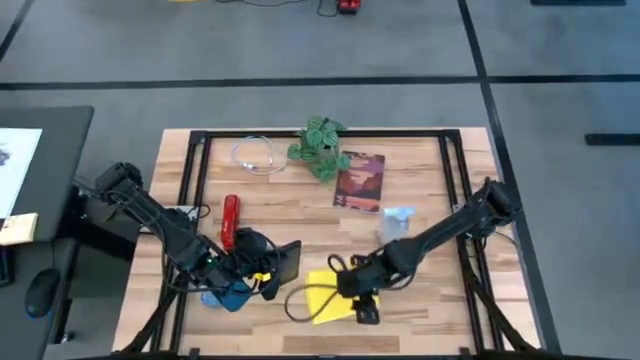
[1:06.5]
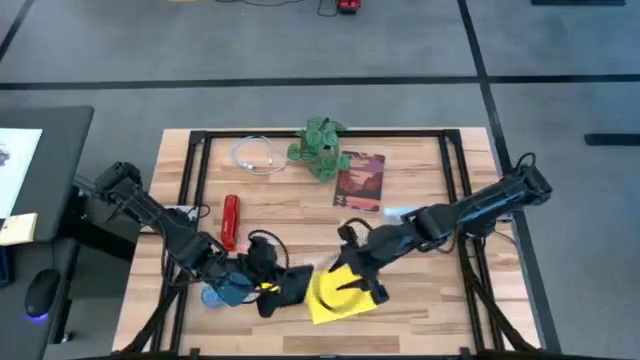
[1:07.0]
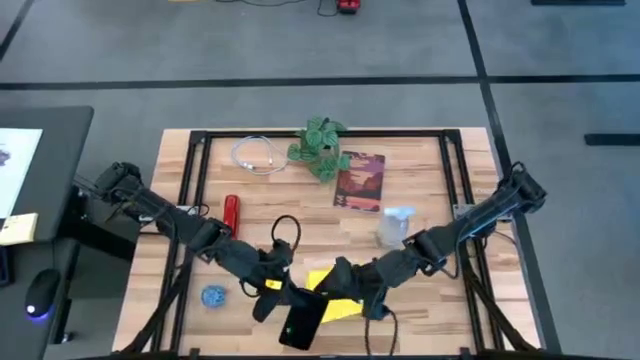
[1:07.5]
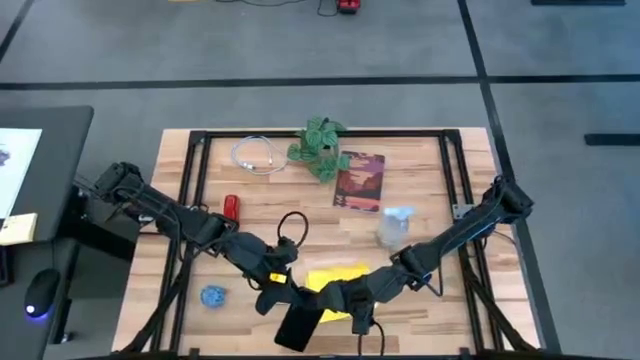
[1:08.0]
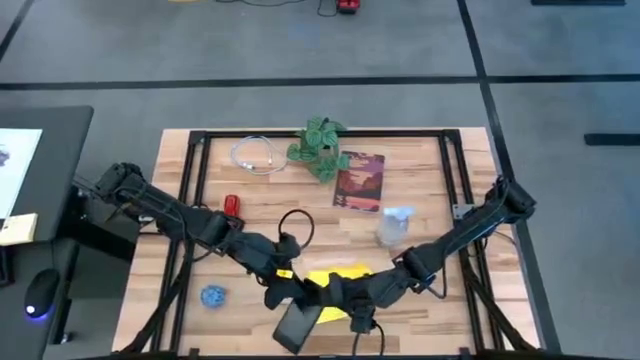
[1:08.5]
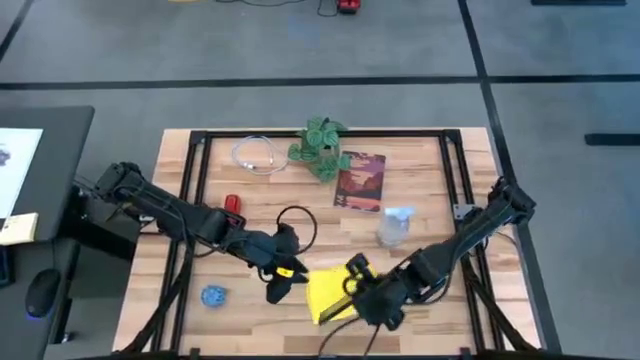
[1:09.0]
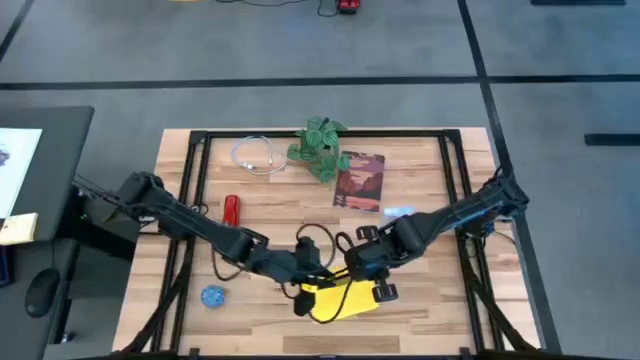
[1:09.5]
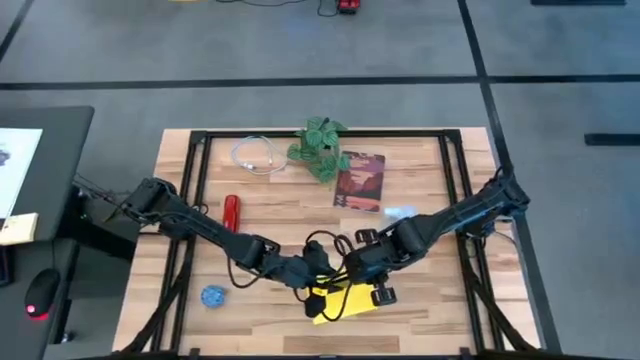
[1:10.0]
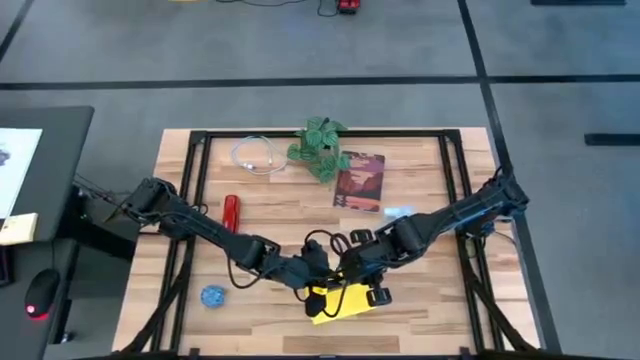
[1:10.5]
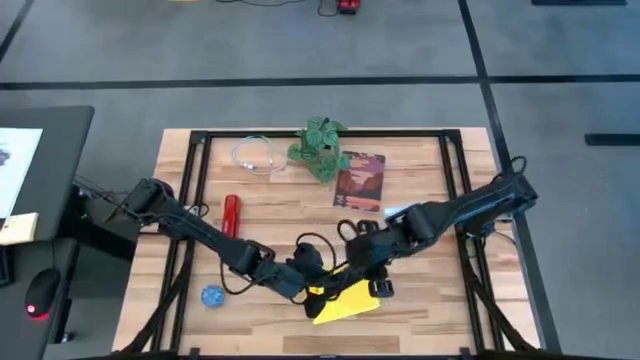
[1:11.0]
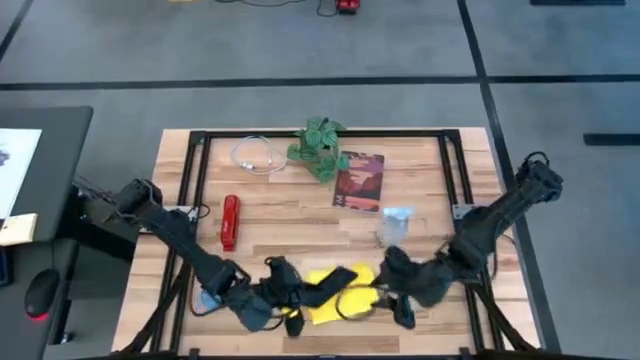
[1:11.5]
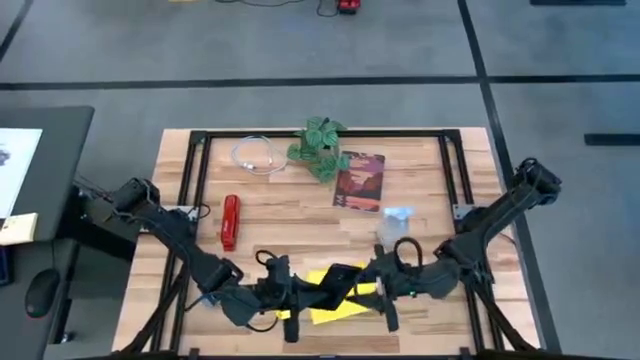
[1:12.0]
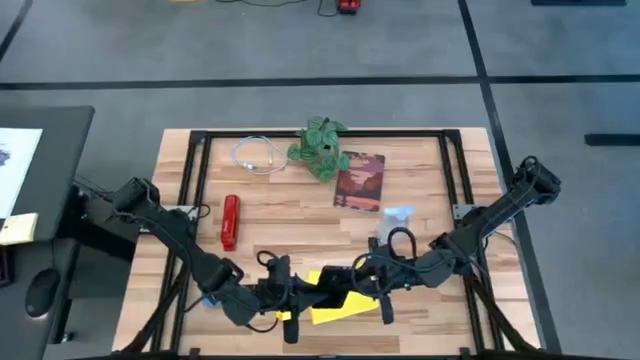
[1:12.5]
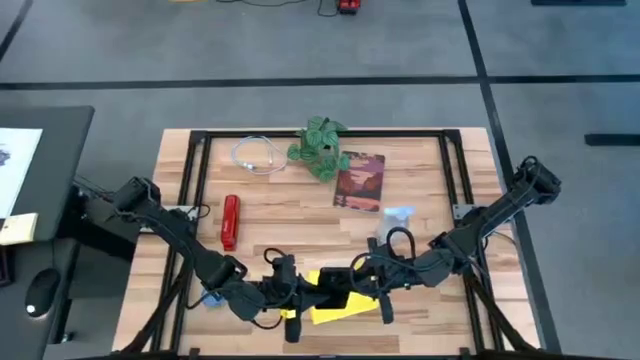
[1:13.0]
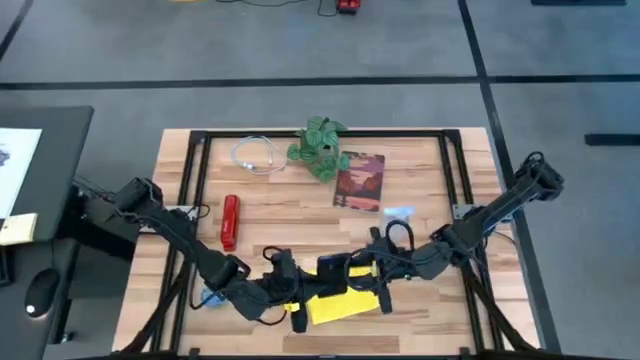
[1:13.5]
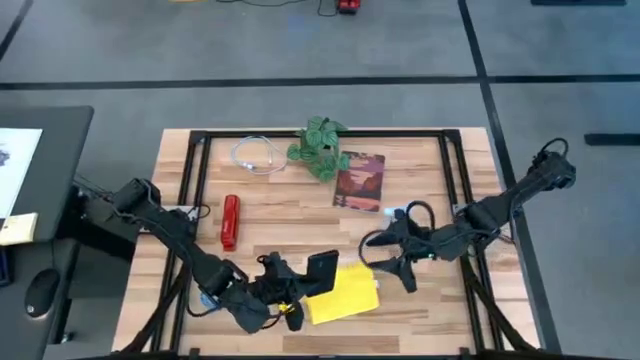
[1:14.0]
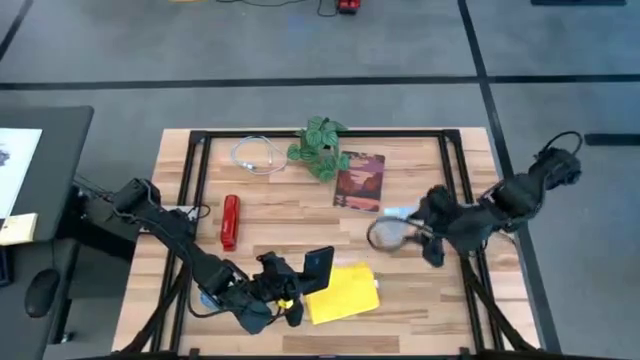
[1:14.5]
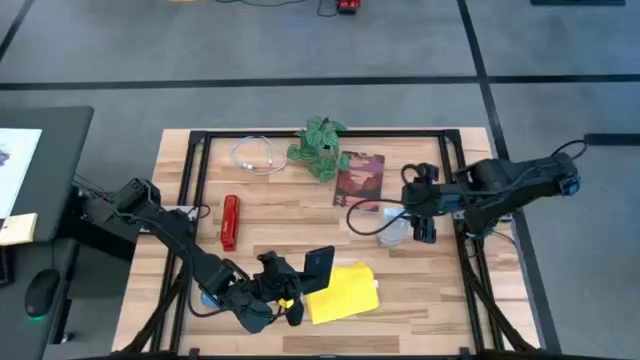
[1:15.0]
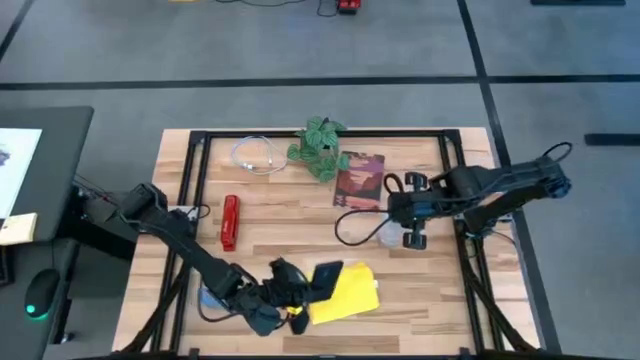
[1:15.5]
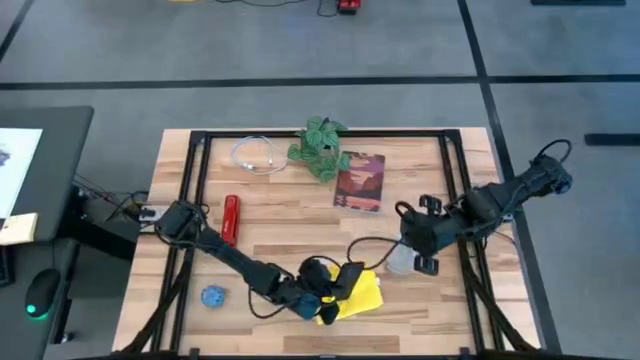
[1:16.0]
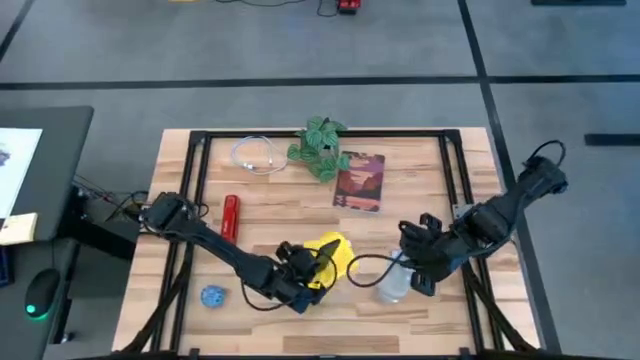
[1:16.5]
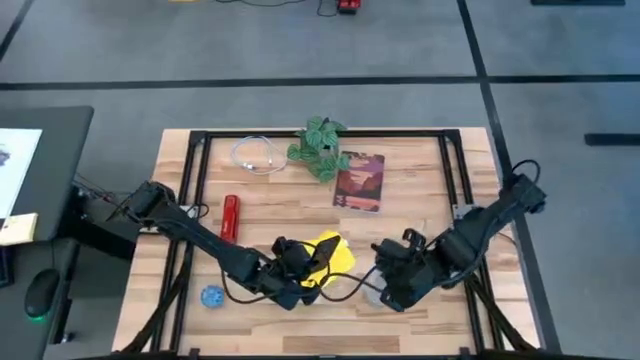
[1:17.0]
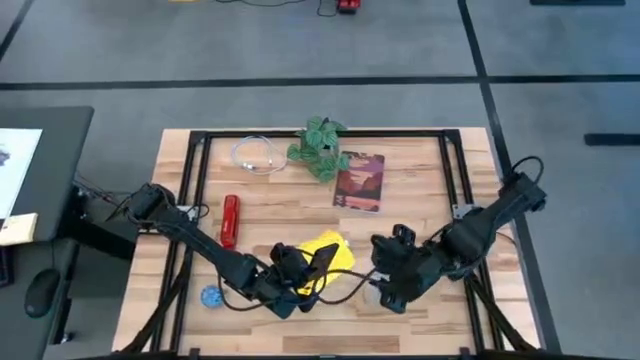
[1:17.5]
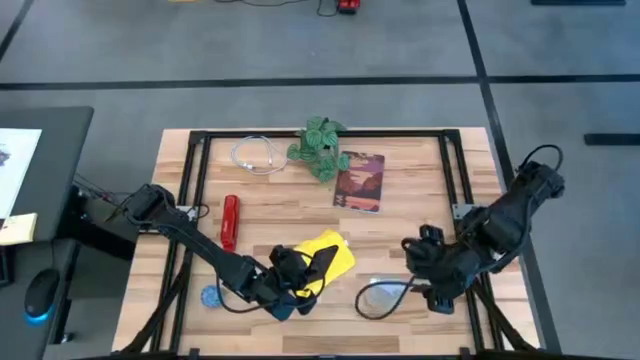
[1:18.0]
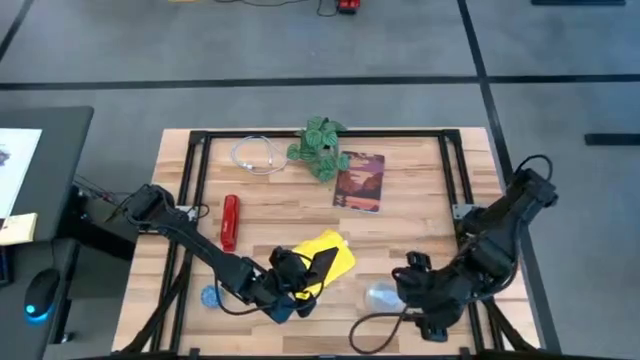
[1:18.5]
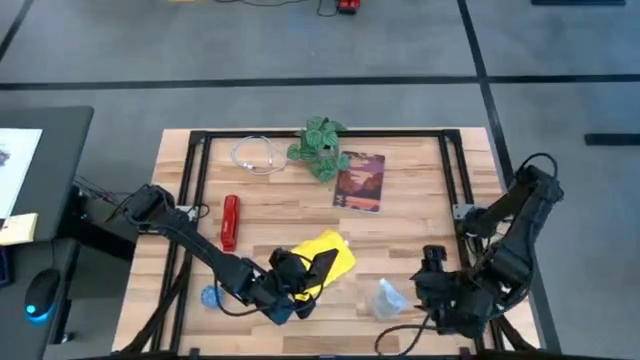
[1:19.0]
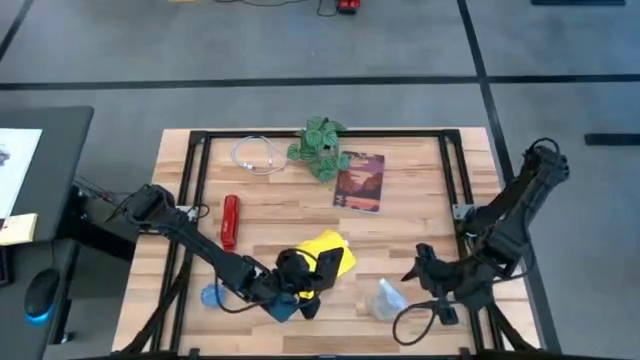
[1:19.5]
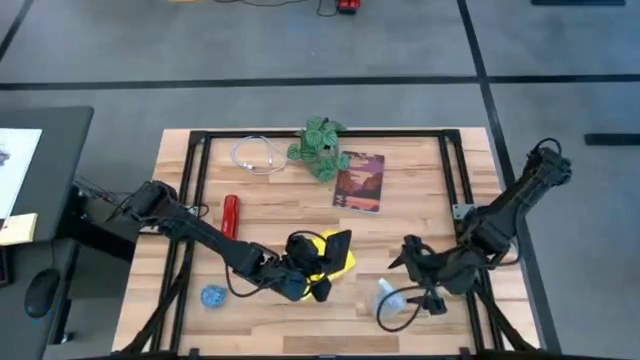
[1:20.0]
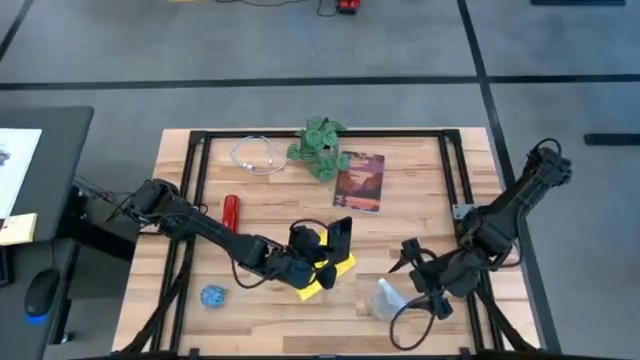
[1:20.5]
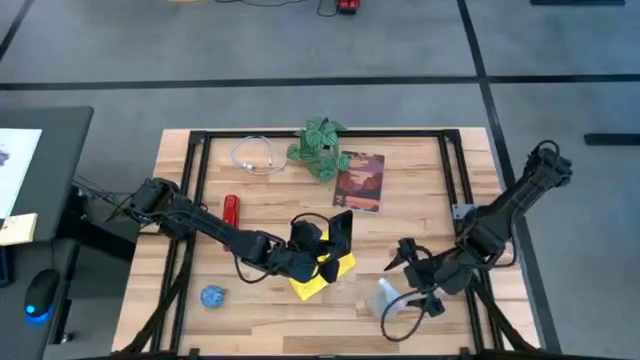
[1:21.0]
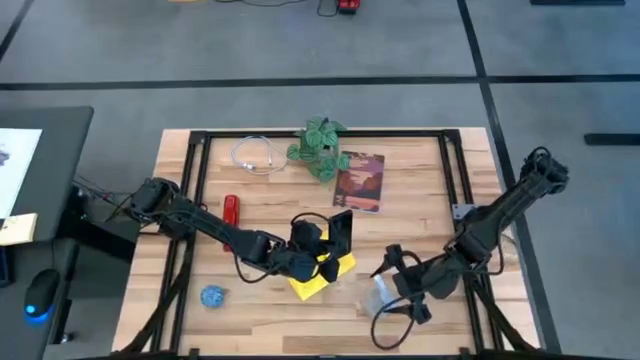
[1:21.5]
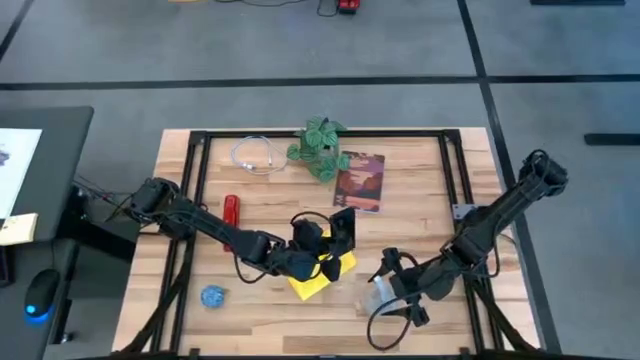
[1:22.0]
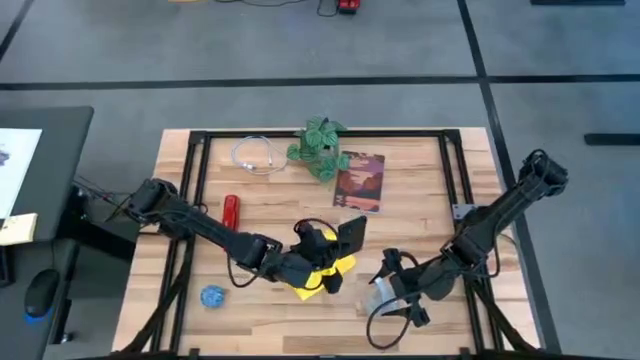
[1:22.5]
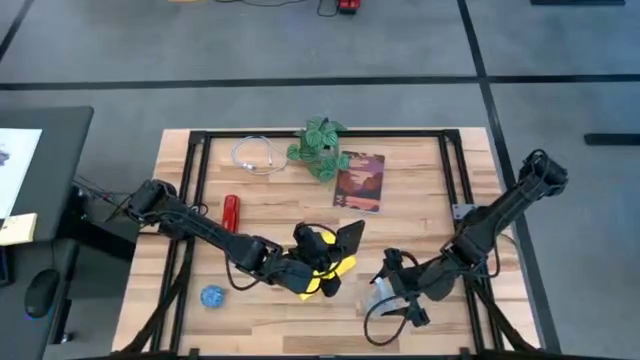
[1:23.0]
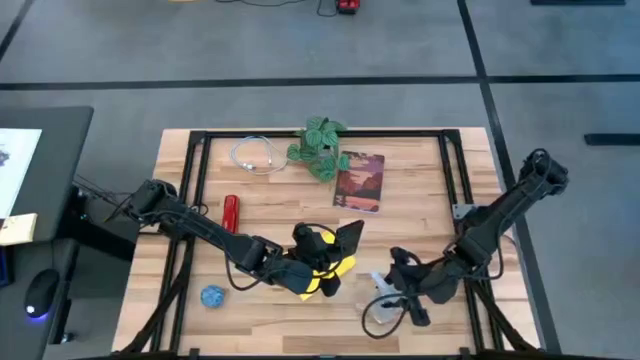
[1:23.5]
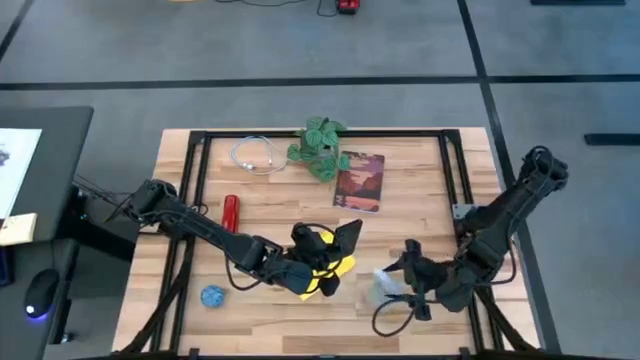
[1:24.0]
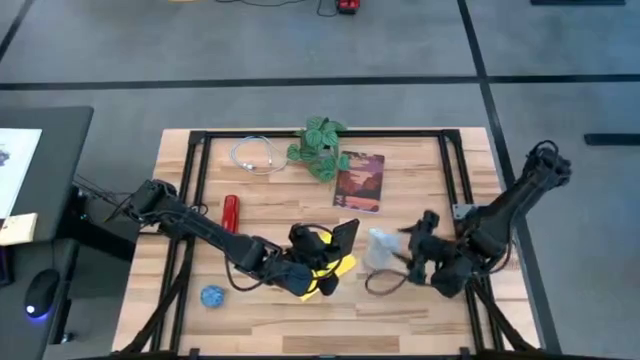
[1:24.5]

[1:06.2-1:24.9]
Task: Apply microfiber cloth
Spray the back of the cellphone using the spray cleaning bottle

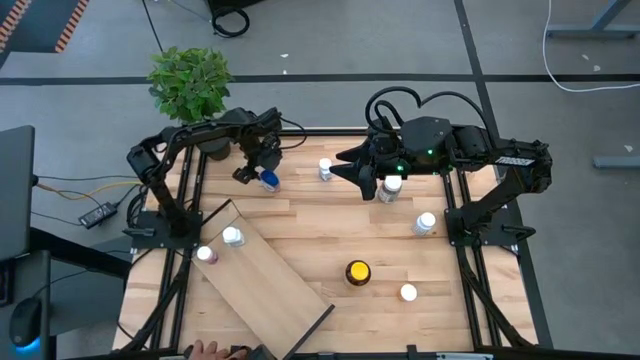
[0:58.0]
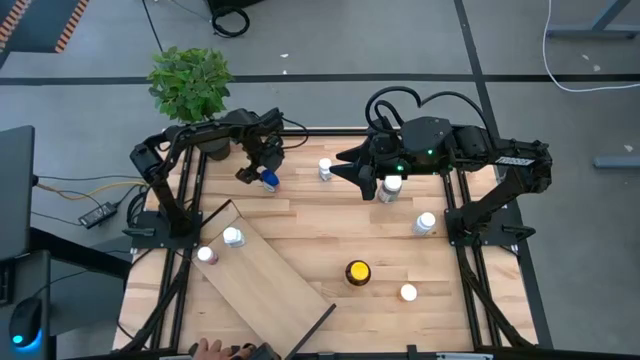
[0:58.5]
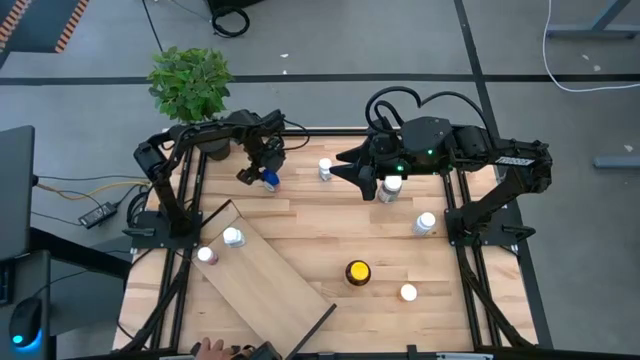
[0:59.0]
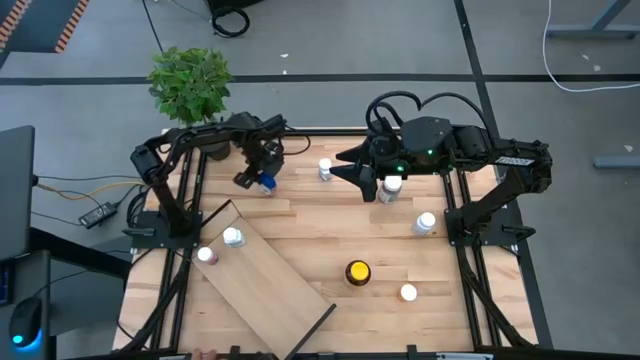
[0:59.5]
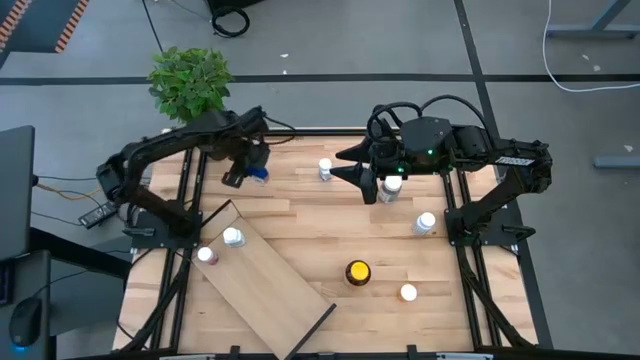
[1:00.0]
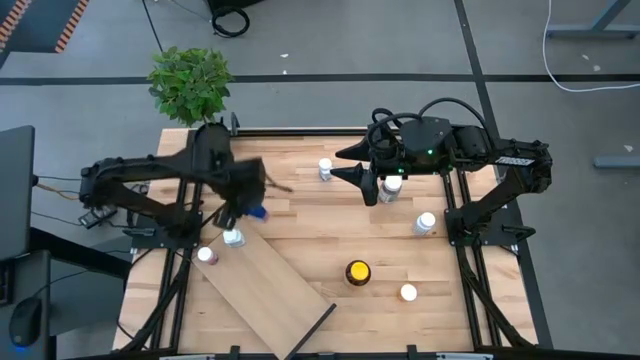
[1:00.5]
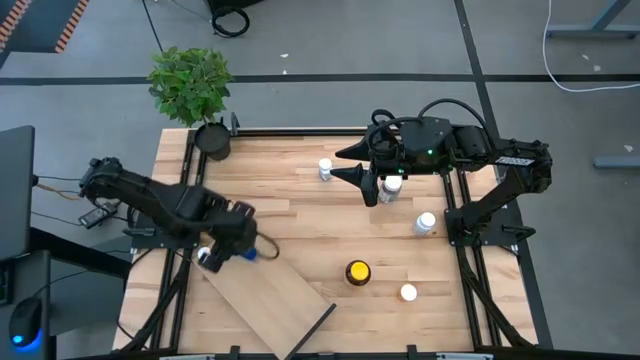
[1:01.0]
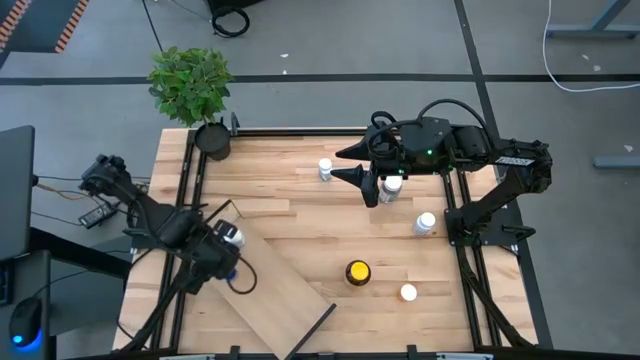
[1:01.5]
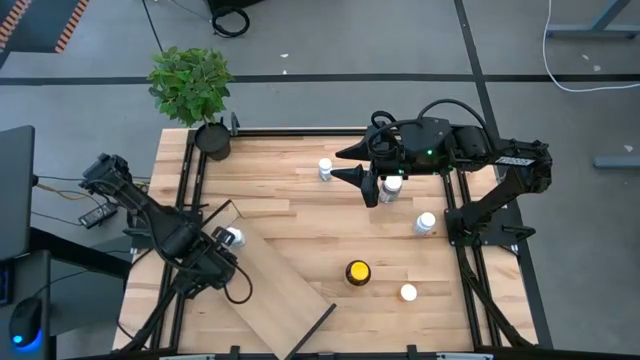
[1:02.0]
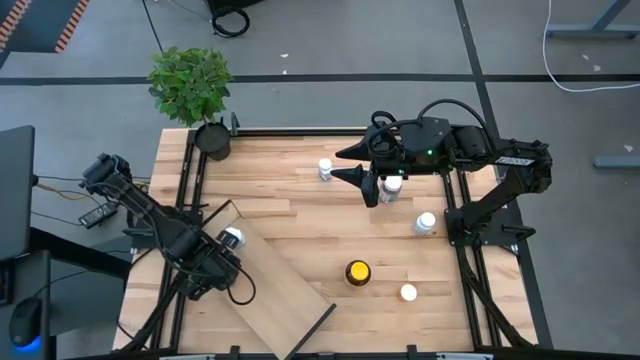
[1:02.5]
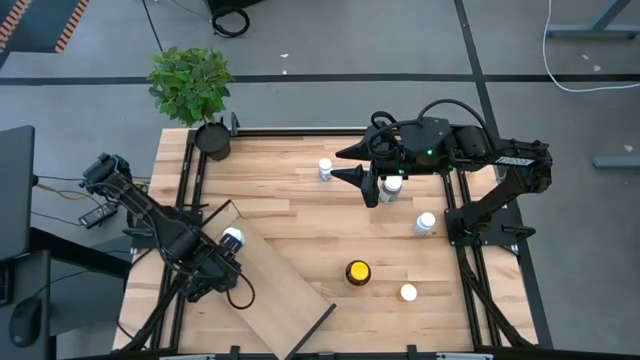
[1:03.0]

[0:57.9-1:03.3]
Task: Pick and place medicine bottles onto shelf by color
Put the blue transparent pill bottle on the shelf
